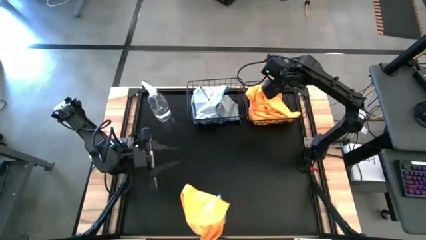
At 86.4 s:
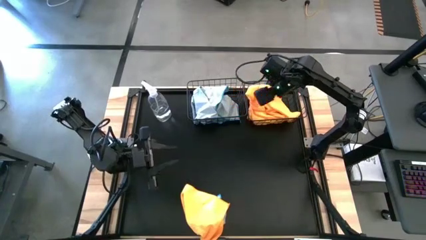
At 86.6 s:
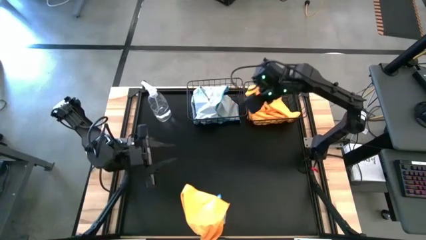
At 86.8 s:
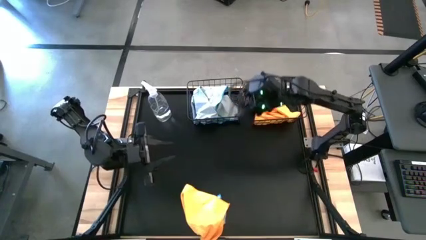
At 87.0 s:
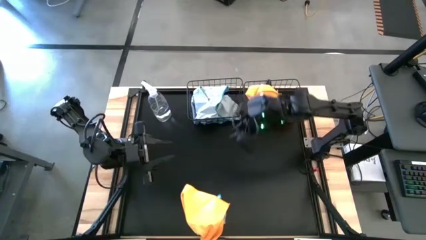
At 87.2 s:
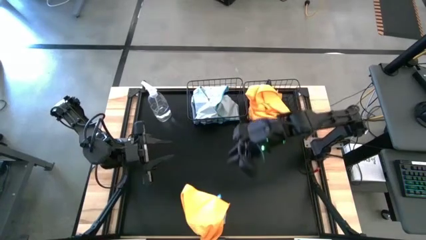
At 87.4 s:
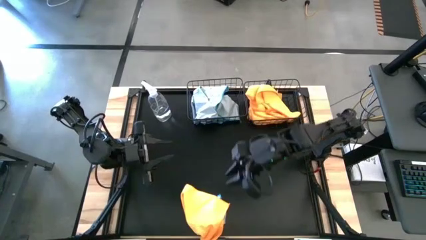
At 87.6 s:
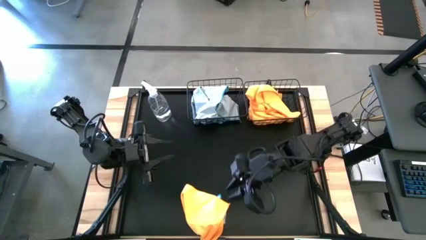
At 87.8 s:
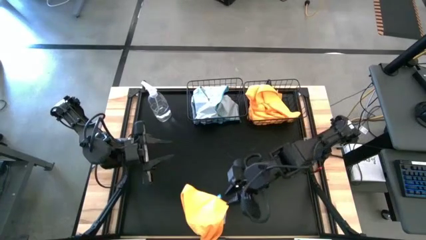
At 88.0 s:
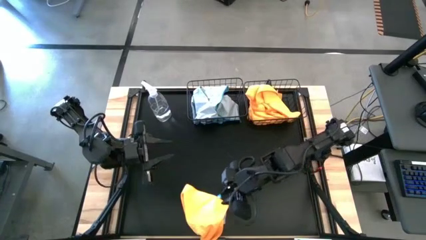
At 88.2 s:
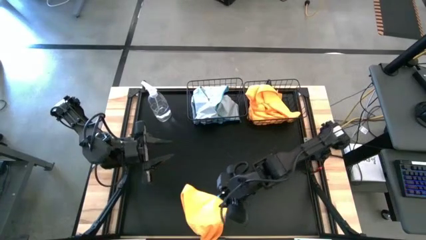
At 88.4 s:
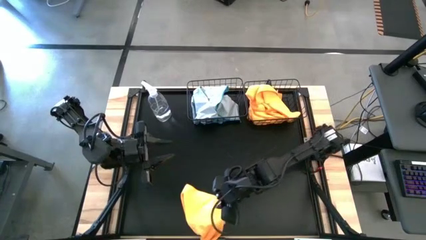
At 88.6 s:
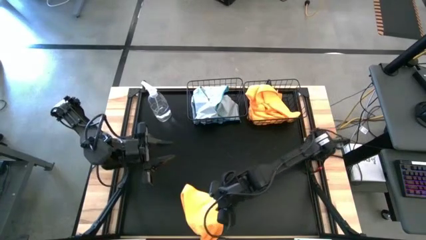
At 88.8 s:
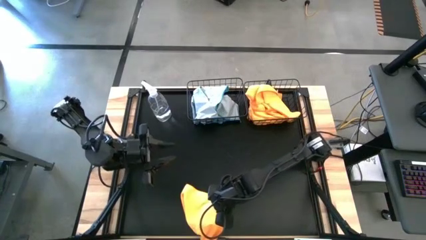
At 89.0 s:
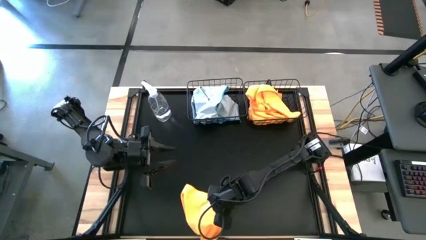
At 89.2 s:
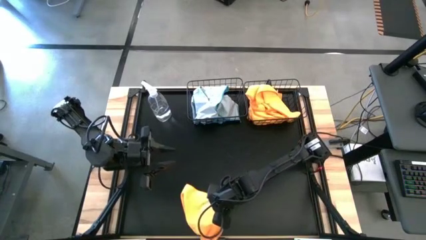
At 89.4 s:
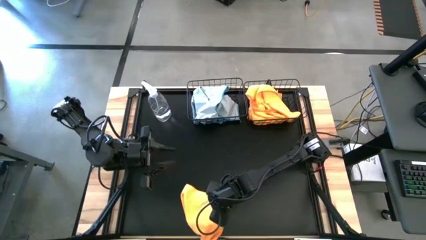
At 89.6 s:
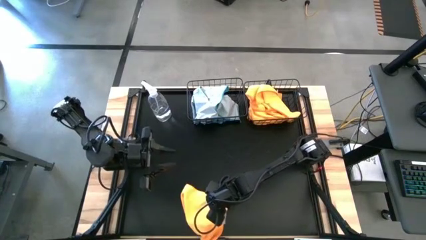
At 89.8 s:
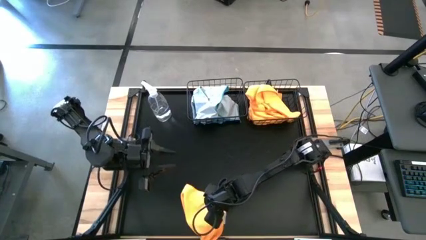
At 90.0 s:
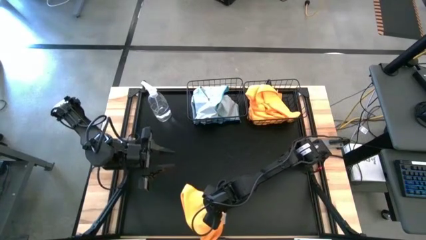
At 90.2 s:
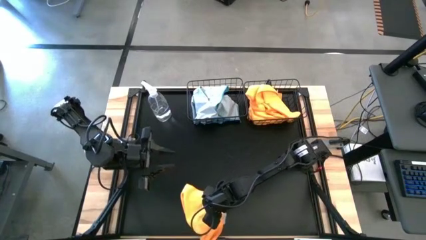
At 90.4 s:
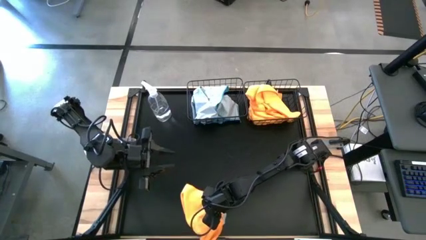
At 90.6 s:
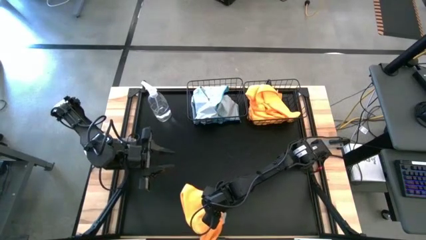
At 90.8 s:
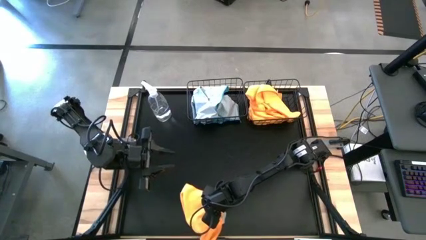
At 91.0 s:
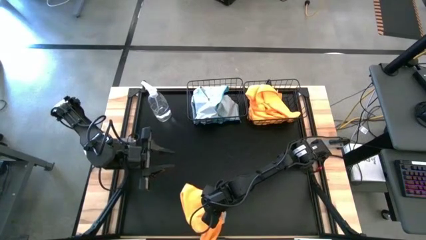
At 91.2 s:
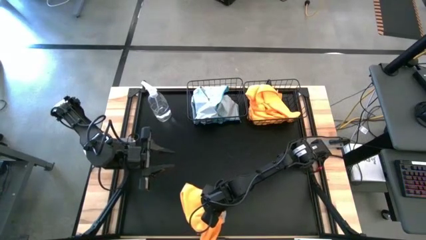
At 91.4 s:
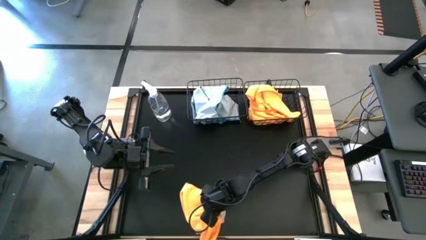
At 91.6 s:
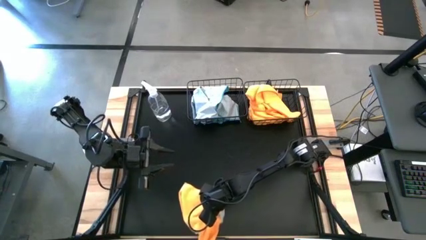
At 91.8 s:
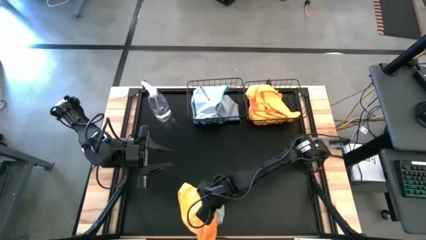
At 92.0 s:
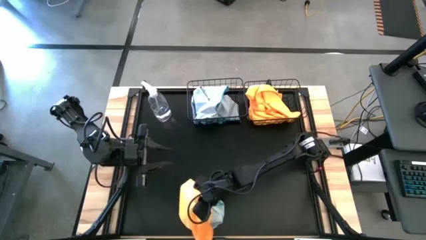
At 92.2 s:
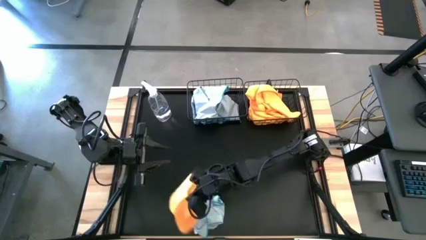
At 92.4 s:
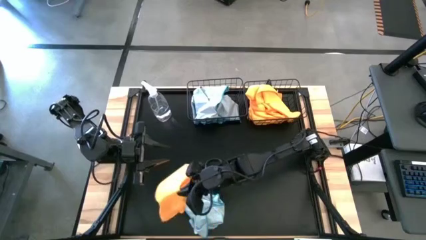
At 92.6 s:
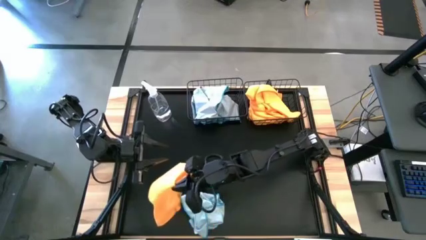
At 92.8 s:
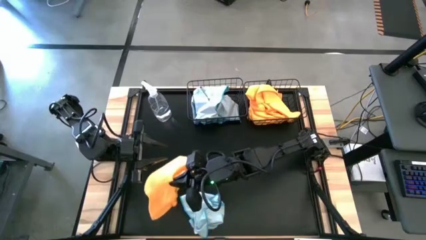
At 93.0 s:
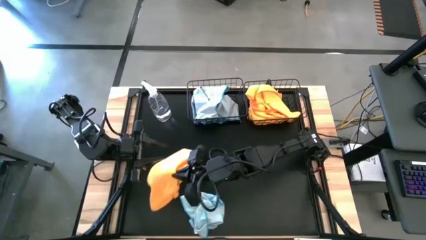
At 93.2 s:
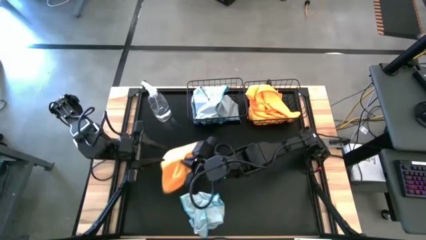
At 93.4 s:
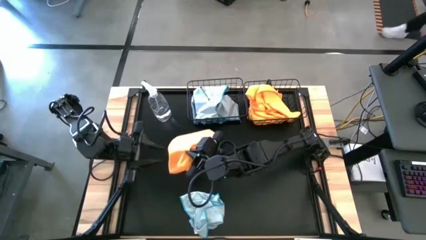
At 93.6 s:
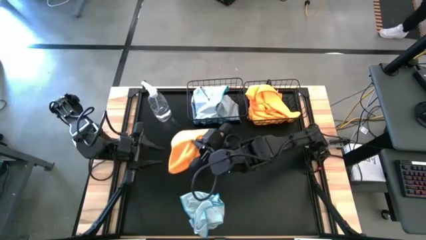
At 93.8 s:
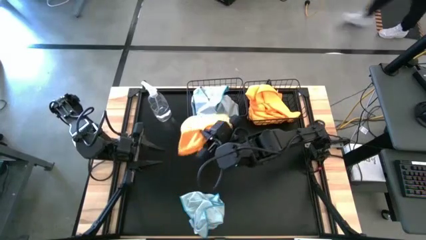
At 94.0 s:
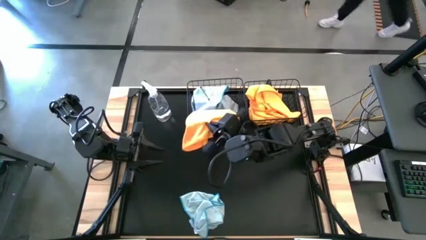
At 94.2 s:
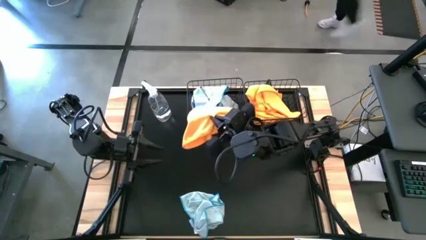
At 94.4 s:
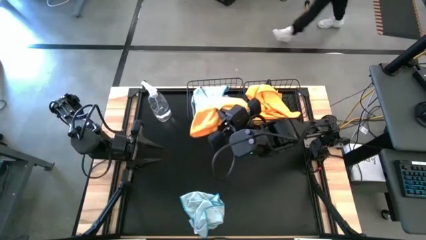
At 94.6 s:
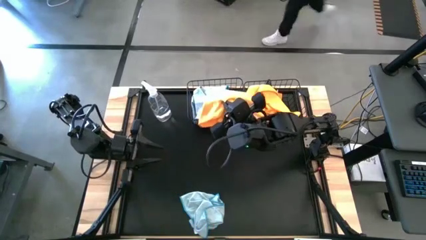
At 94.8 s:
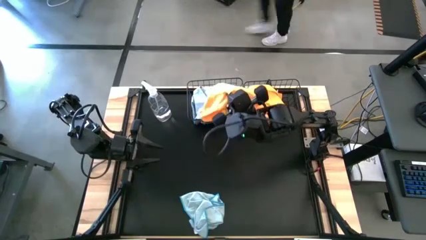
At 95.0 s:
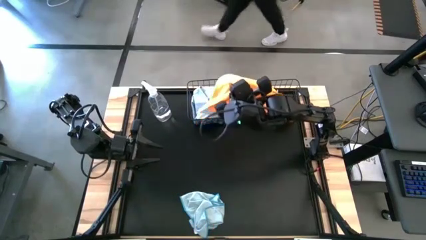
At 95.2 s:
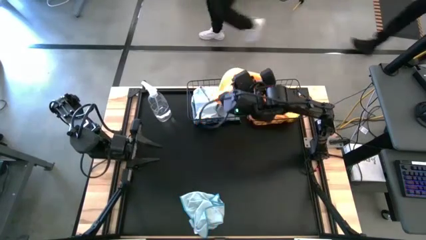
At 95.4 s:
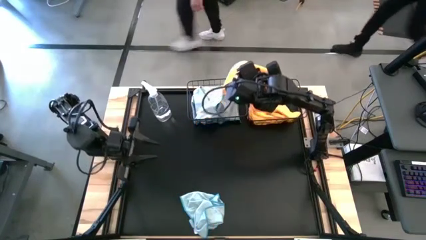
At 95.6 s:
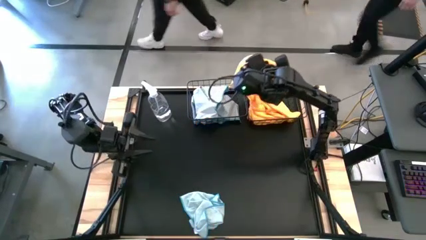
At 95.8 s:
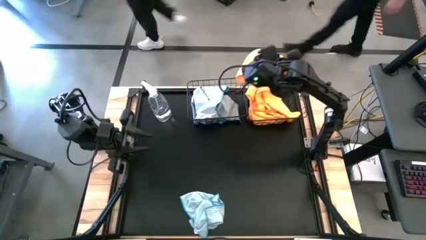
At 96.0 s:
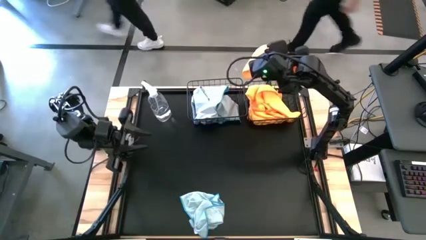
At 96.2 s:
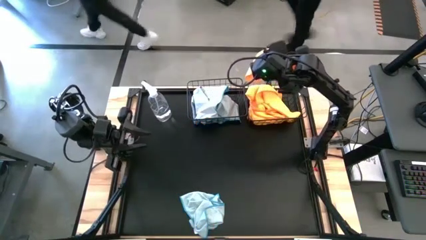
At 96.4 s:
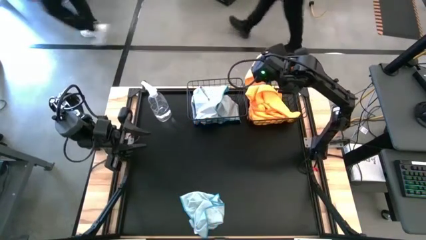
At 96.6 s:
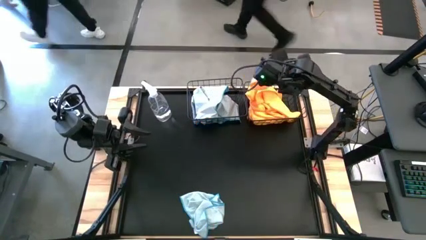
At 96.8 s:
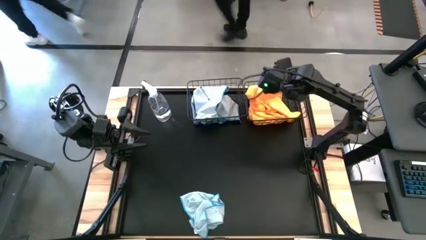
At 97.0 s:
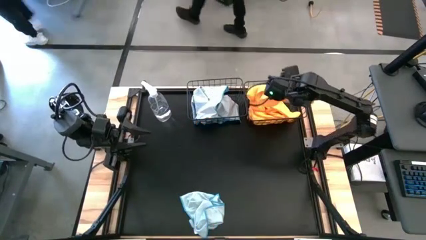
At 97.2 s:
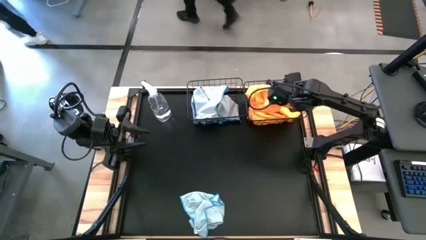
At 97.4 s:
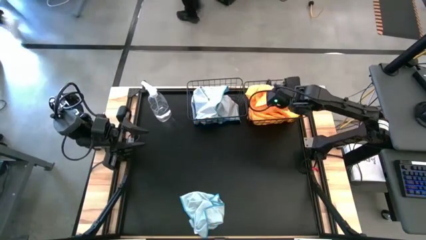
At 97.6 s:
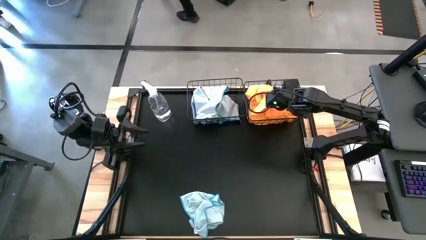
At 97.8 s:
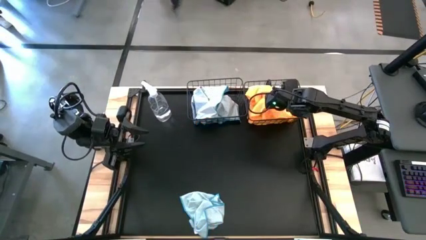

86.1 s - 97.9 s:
Task: Sort microfiber towel by color & place in baskets
Put the orange microfiber towel into the right black wire basket

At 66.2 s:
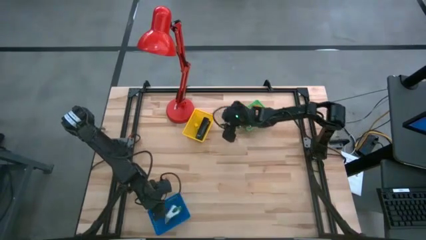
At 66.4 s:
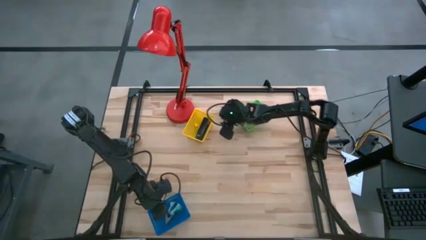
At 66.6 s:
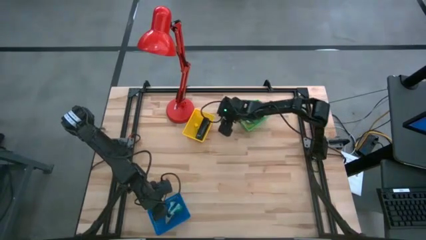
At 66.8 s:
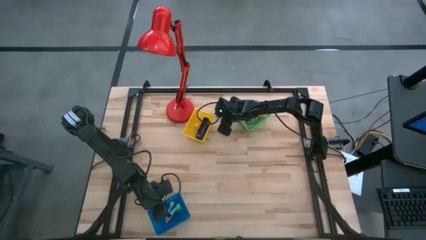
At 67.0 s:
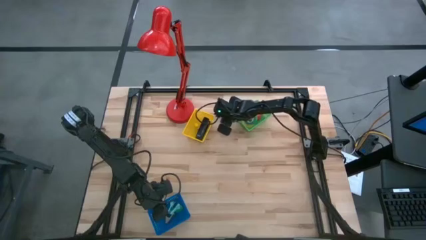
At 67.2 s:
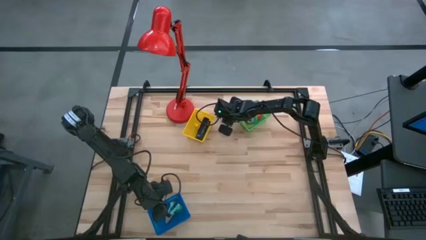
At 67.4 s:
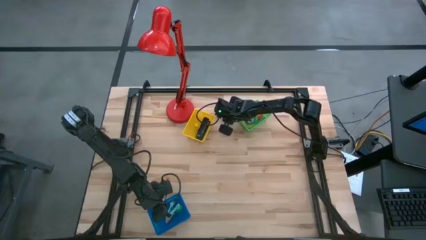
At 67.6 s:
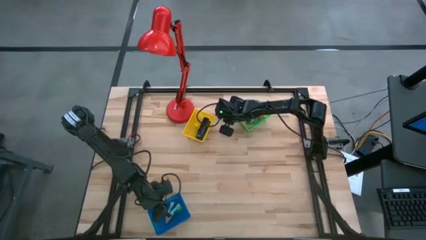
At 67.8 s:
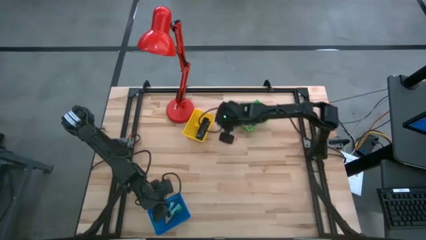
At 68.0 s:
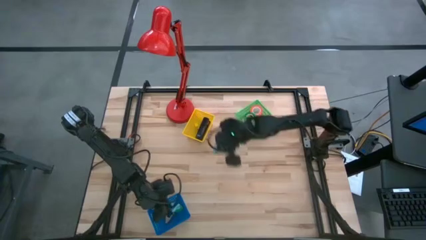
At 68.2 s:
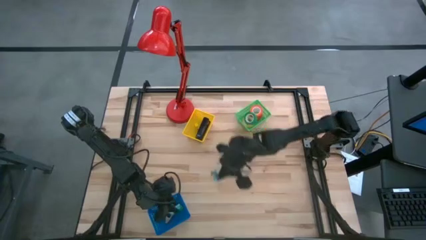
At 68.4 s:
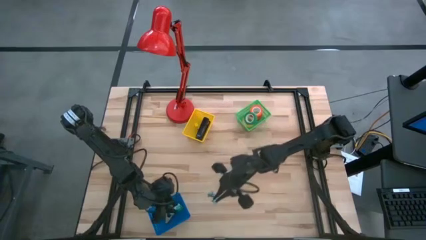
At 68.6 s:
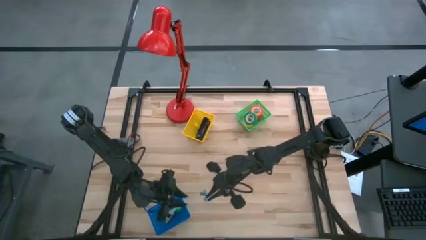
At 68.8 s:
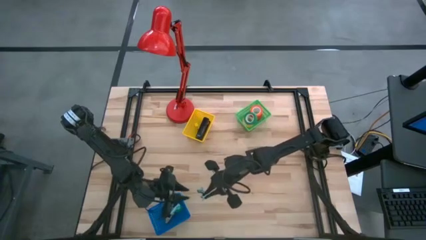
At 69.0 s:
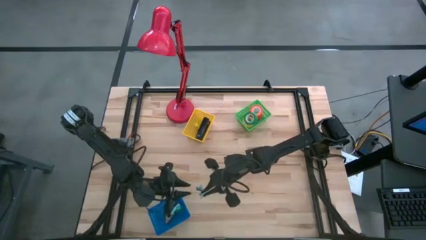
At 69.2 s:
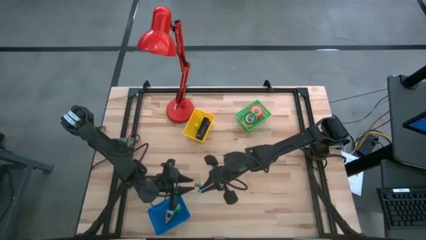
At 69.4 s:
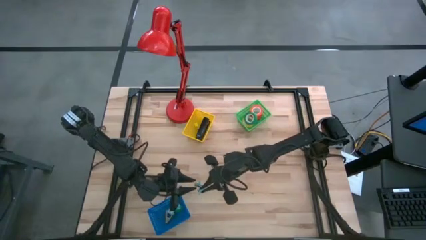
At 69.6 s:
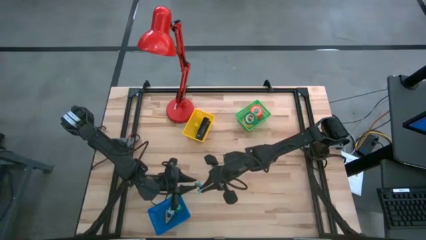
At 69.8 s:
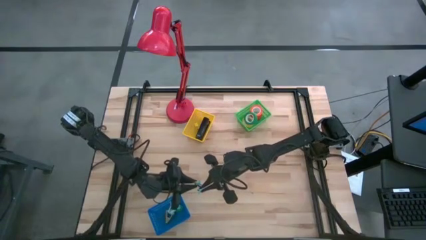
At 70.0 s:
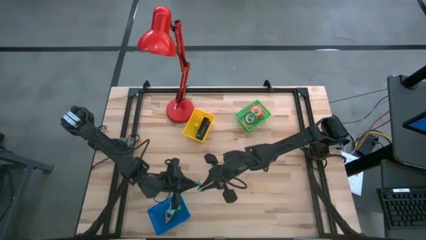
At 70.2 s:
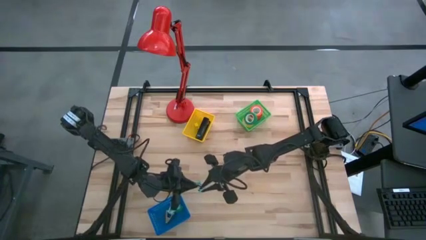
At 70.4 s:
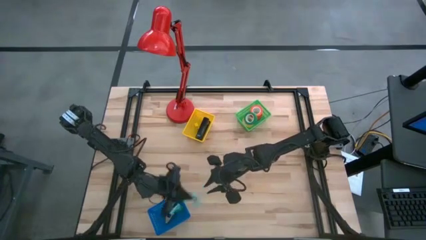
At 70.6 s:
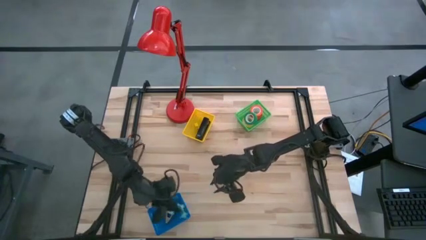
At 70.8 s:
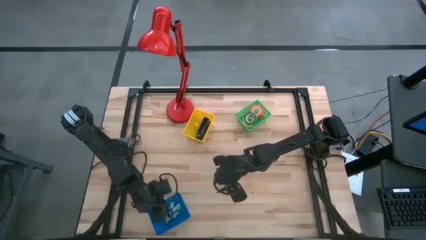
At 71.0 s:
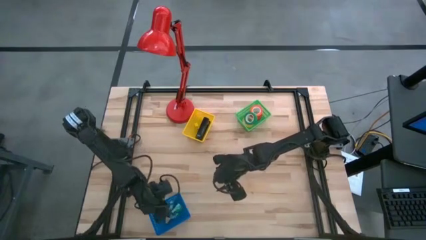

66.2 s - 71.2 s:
Task: Pick and place Stapler, Stapler remover, tape
Put the blue staple remover into the blue bin
